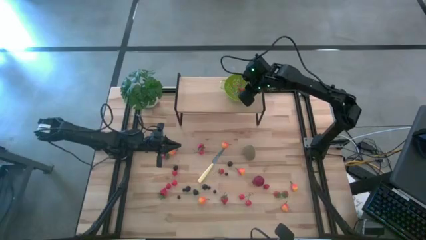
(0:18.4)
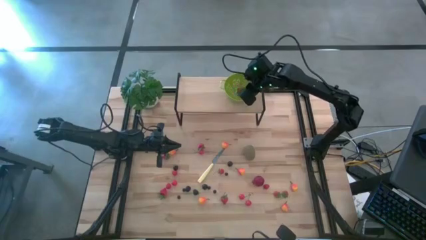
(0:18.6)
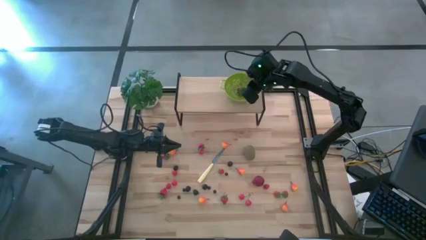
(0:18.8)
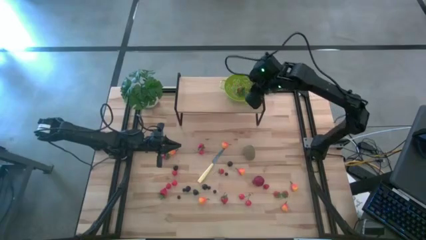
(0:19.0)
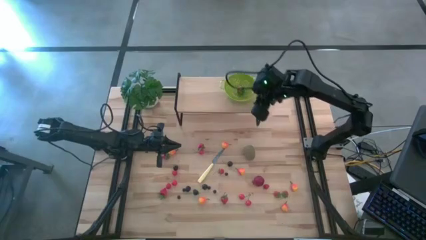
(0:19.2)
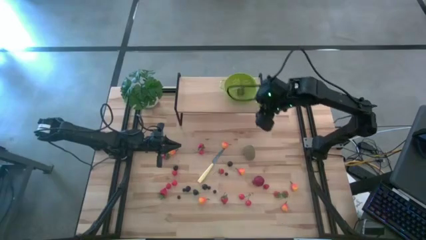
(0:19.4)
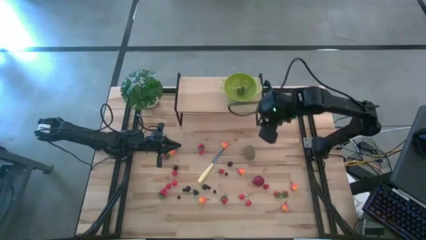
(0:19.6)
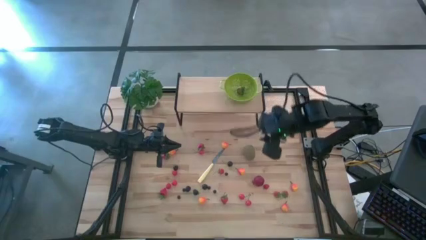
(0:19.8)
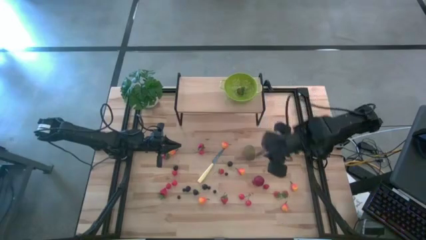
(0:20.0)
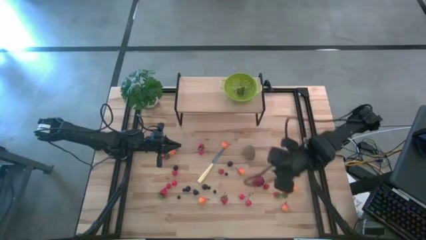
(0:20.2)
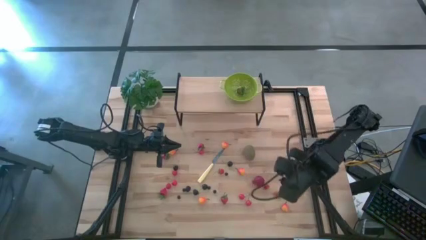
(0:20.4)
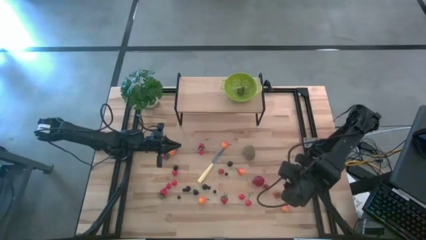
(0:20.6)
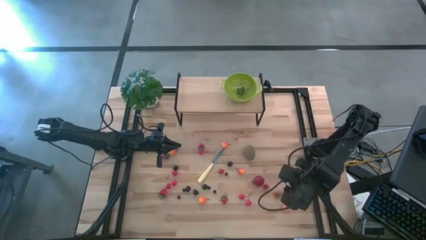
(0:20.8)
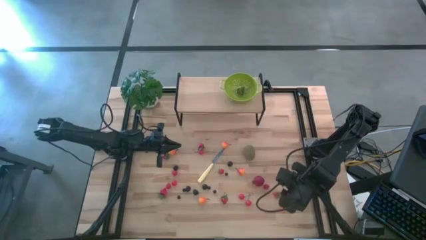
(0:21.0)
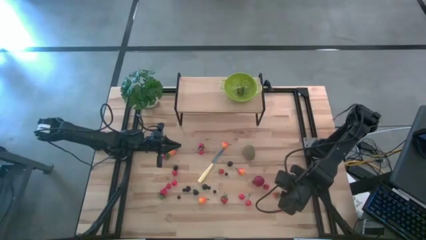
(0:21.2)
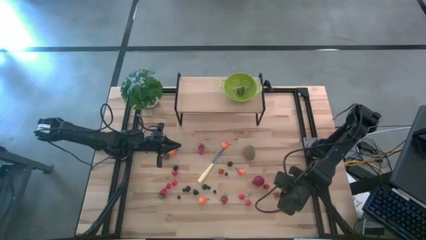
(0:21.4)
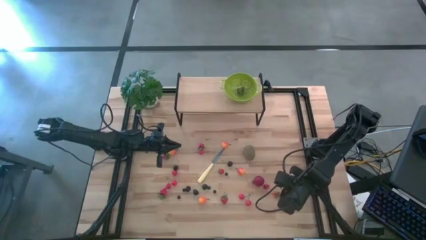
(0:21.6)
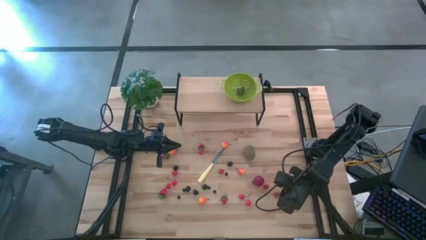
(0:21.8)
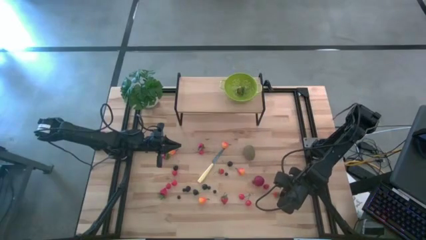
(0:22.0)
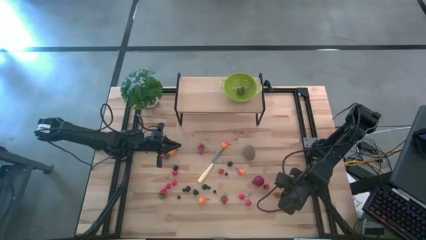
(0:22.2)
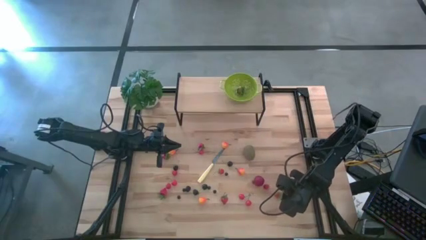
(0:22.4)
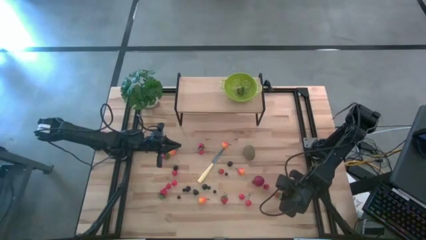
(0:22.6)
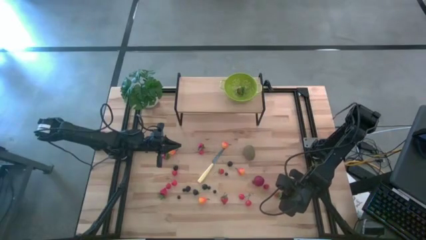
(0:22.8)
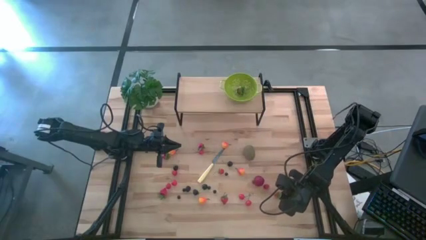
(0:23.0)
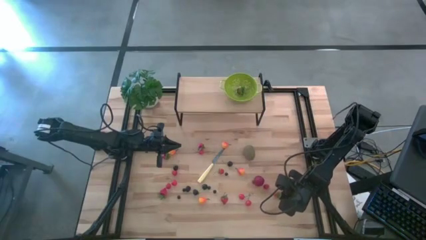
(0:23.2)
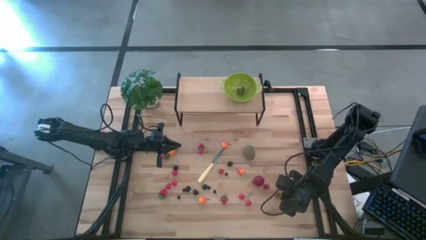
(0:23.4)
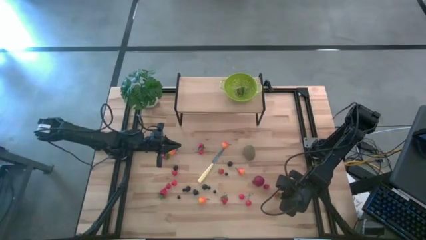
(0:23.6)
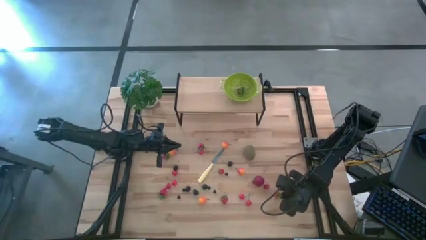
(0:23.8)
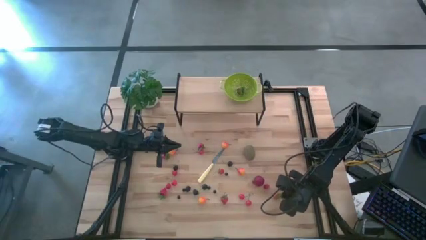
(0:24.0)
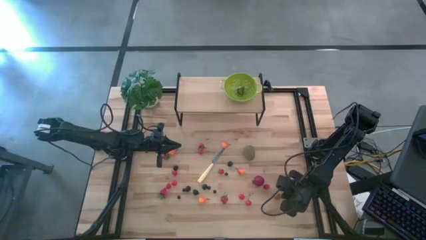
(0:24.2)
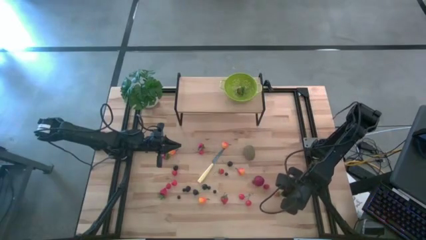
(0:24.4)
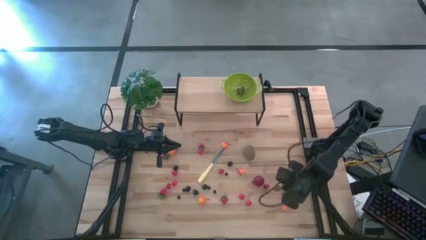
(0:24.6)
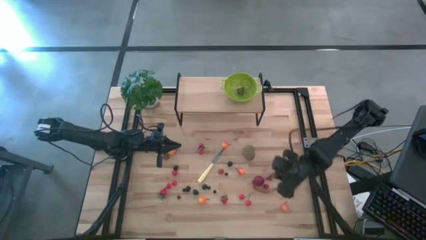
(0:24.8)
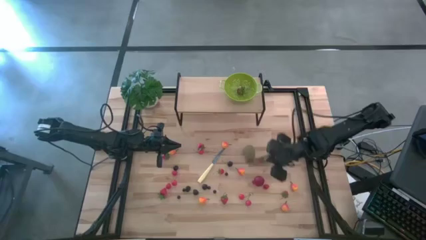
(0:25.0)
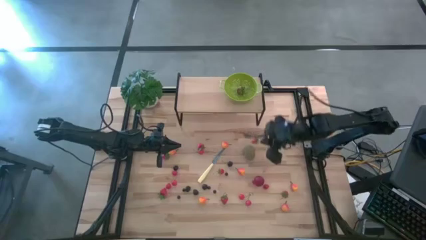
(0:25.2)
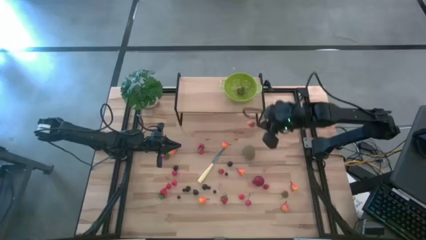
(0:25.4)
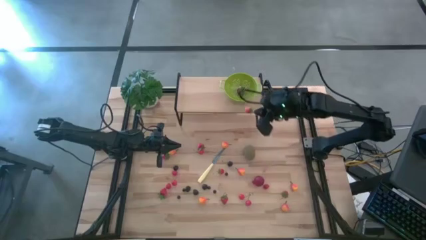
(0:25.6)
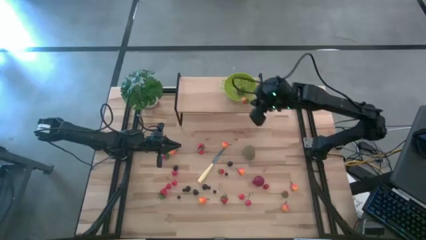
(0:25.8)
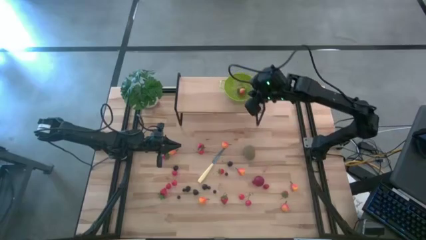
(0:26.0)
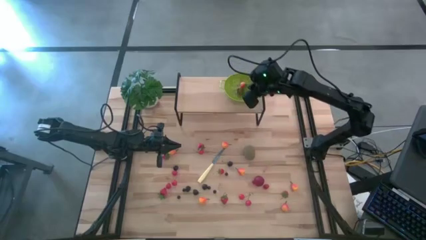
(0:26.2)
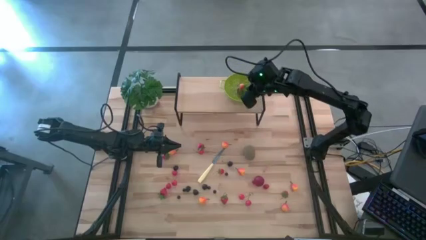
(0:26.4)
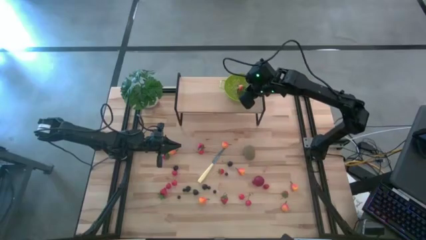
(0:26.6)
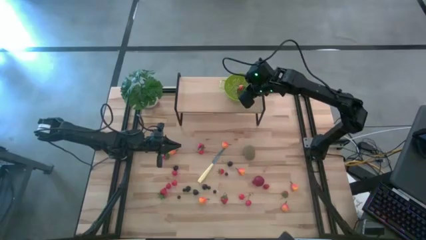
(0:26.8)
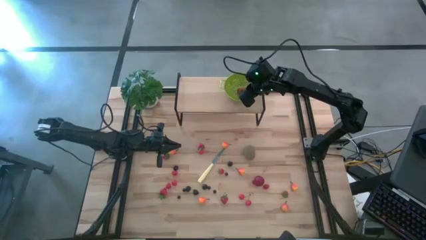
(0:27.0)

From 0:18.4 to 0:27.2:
Task: Pick & Place Fruit
Put the strawberry into th strainer bowl

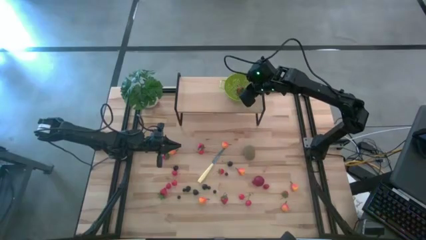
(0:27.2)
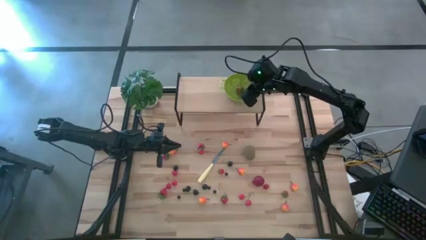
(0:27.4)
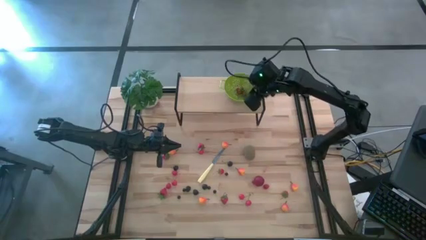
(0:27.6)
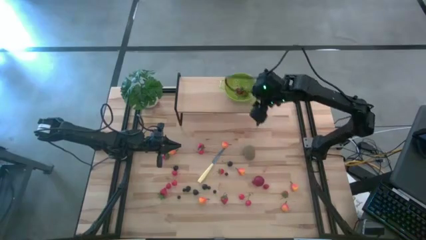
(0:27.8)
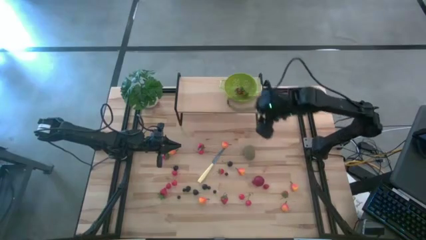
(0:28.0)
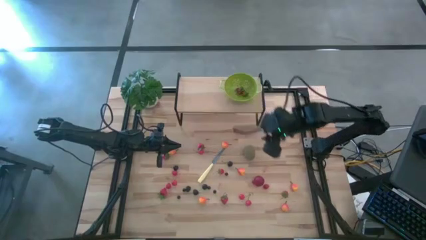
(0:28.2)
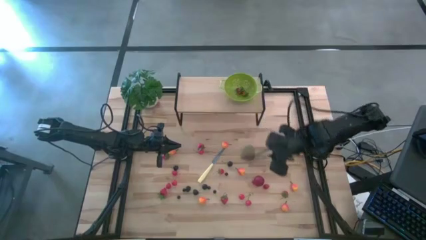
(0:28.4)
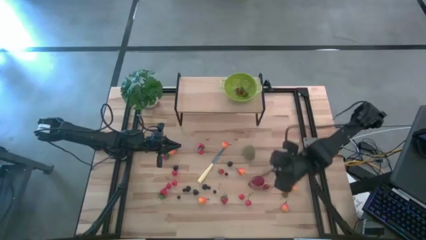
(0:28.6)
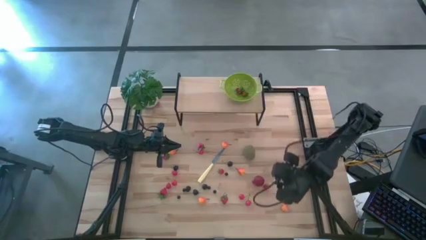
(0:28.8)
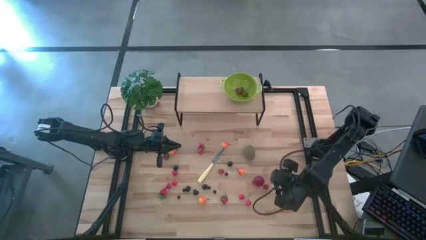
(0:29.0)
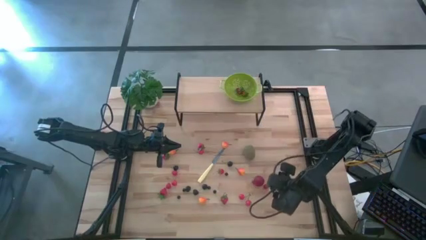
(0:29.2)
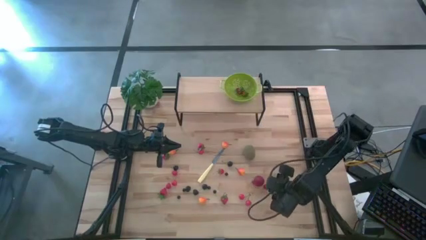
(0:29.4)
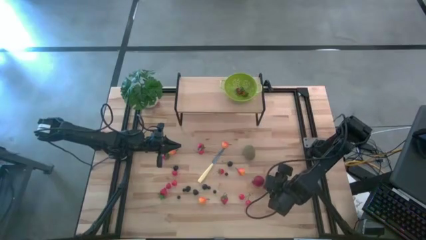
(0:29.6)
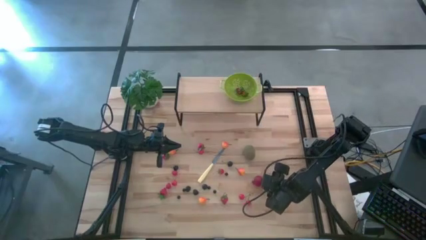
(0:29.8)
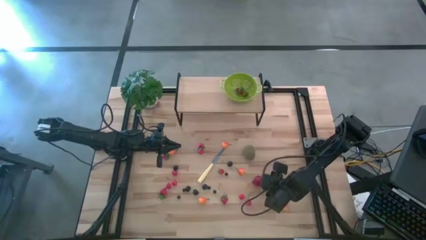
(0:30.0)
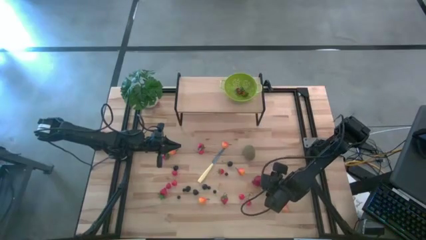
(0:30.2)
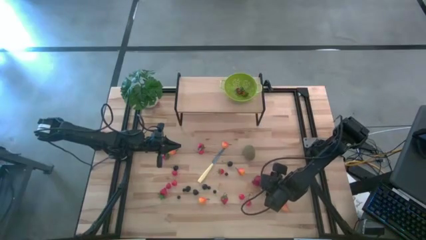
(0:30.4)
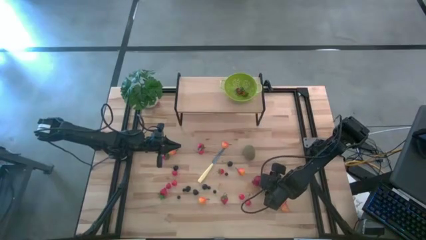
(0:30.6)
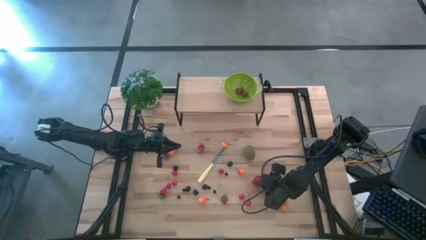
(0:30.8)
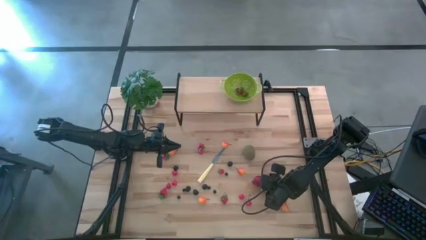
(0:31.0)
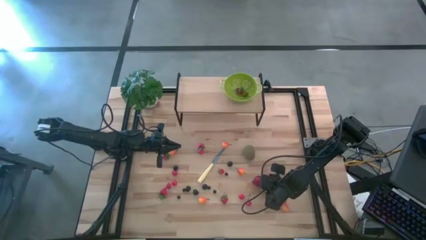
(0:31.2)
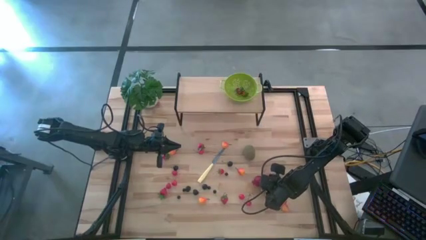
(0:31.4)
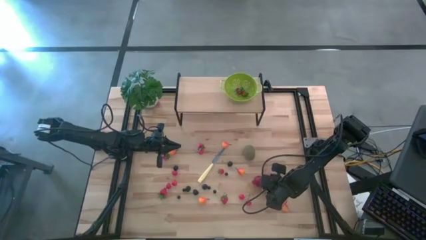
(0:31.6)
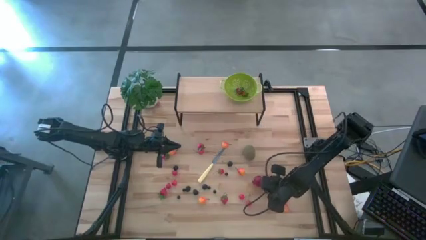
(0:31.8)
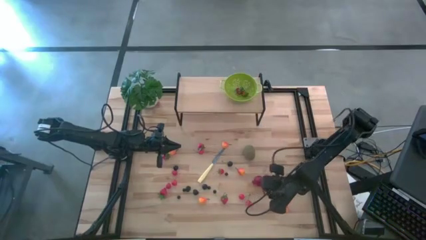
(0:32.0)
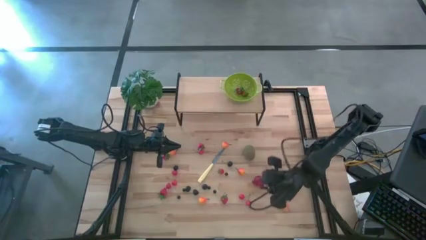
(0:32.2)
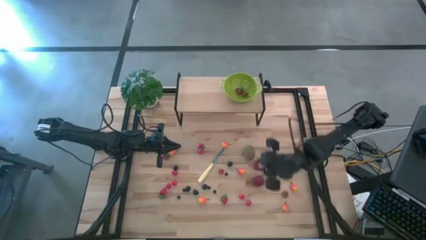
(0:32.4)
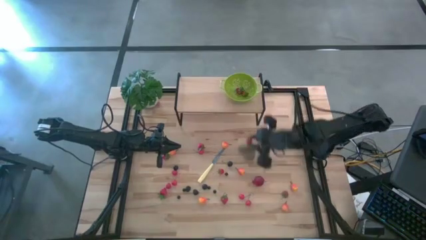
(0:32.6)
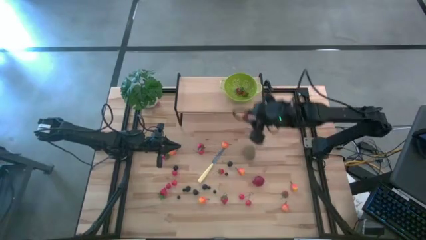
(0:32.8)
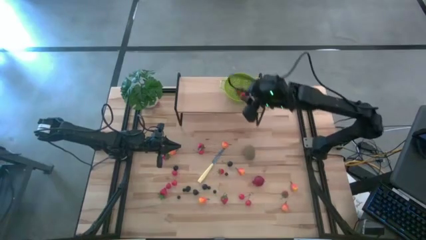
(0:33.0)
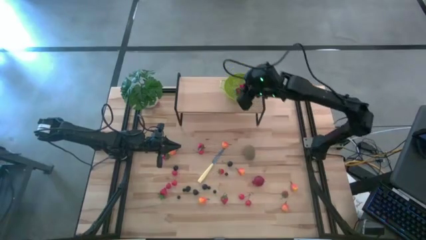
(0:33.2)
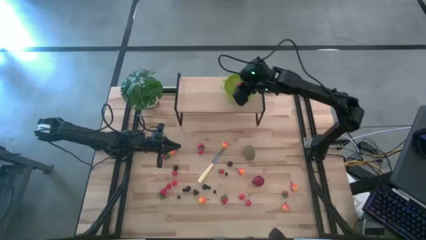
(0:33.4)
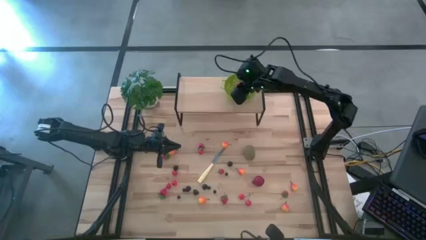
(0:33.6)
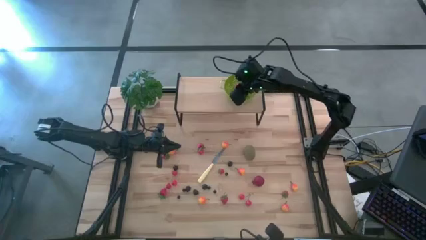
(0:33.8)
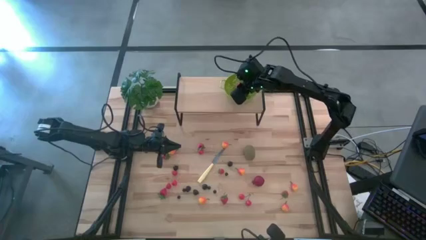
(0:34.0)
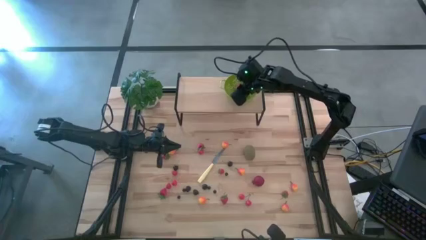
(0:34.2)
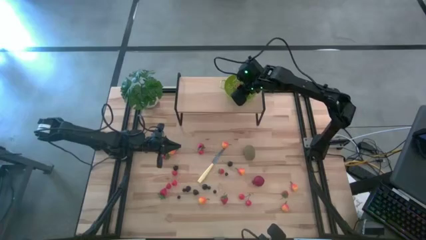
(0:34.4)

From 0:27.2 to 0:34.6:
Put the raspberry into the strainer bowl
